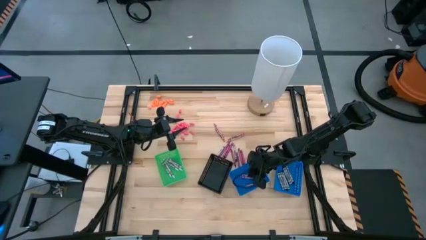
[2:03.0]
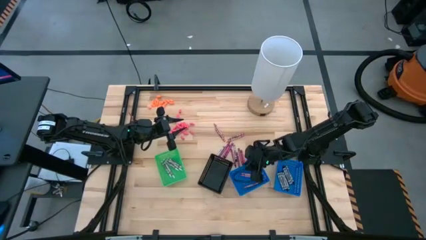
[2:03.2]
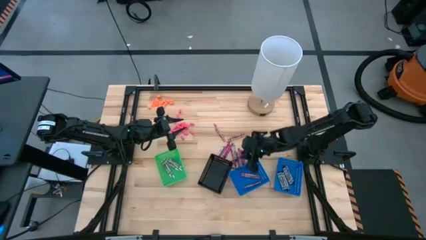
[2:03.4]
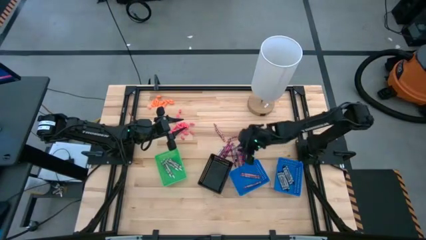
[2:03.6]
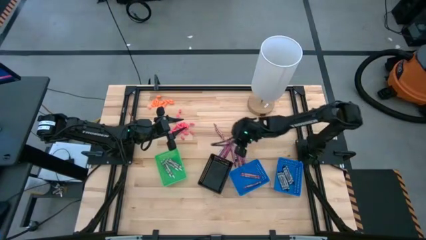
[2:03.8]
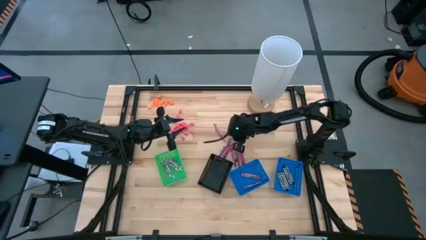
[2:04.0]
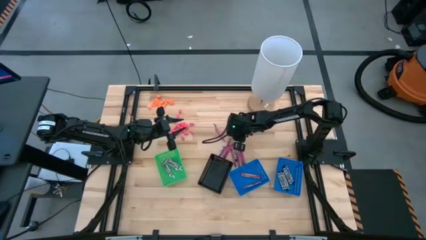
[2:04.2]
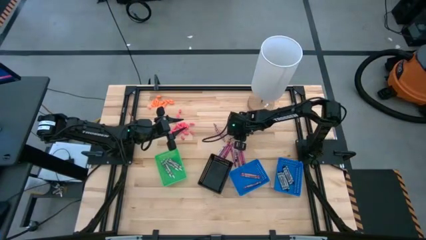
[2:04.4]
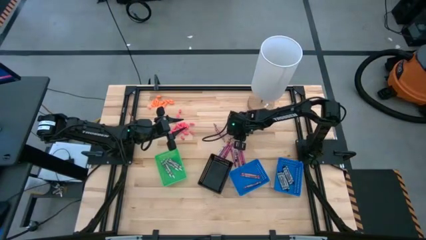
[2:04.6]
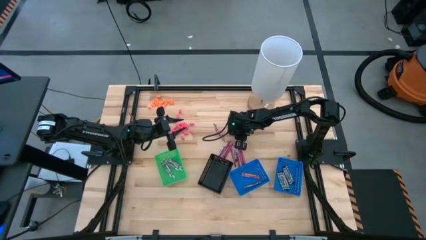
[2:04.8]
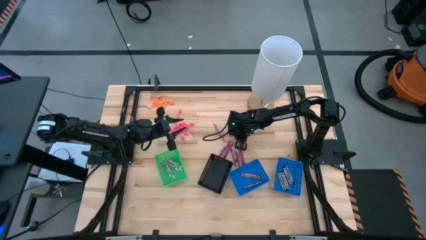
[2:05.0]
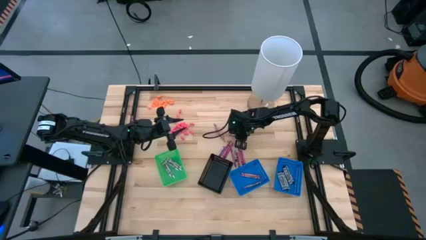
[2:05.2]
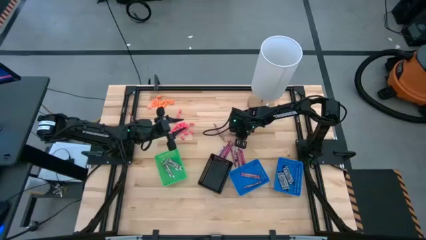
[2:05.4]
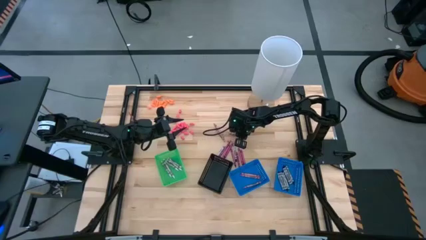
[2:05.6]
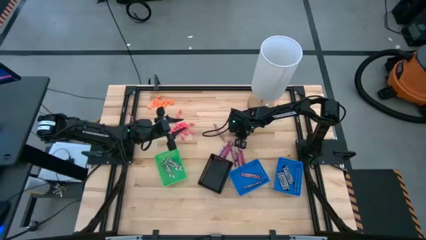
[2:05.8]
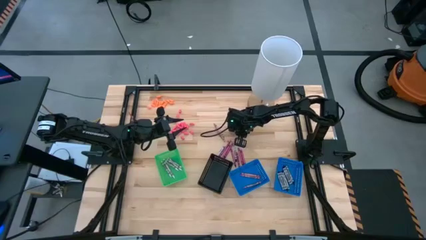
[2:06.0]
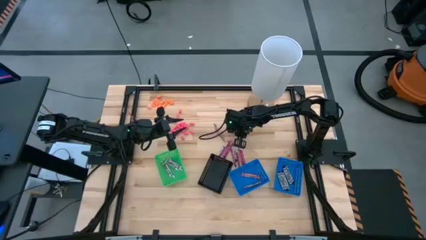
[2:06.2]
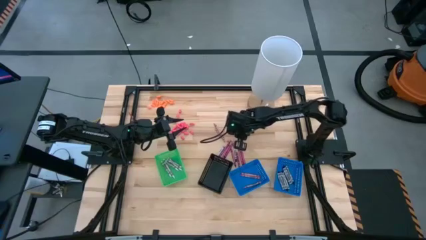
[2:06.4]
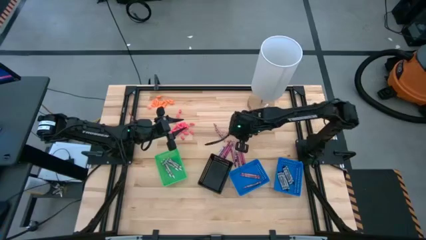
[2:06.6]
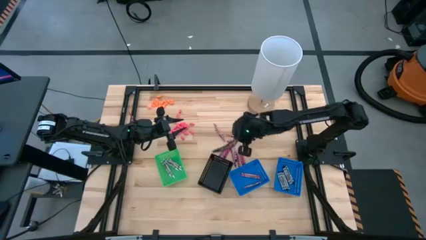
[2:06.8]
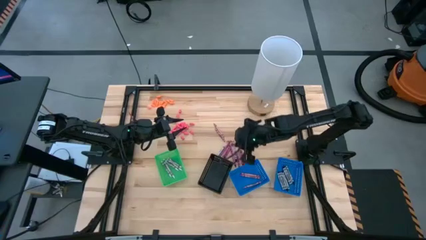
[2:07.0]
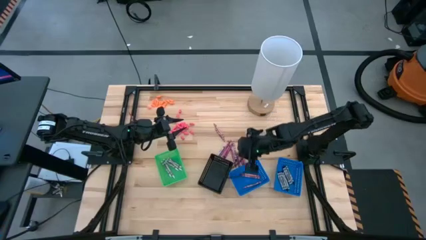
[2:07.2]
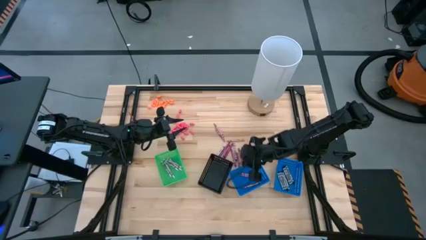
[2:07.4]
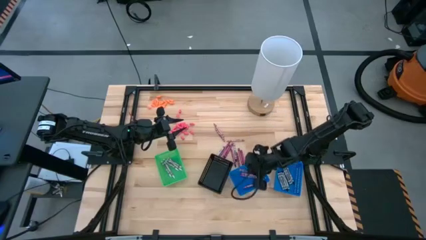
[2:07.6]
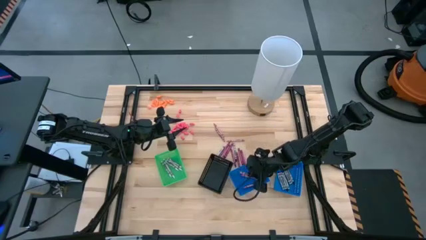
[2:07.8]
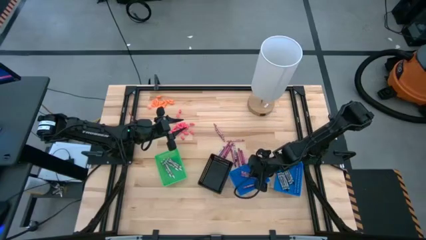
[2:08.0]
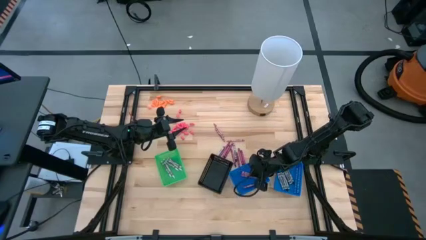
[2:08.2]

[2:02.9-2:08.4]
Task: Sort crayons
Put the pink crayon into the left blue bin

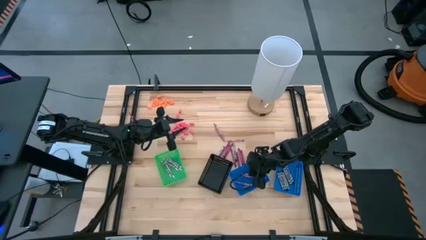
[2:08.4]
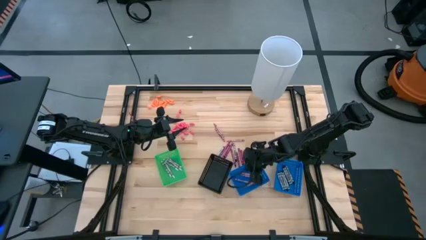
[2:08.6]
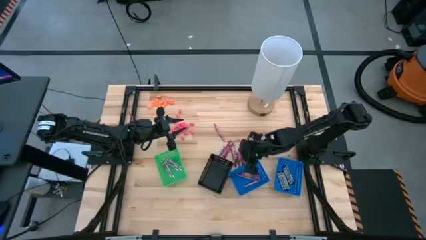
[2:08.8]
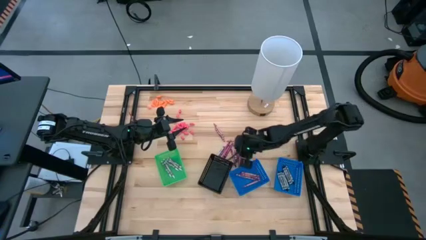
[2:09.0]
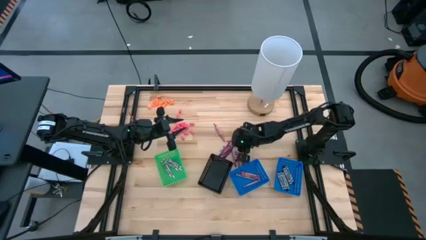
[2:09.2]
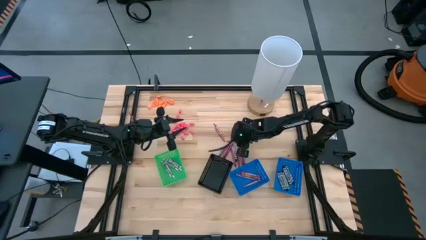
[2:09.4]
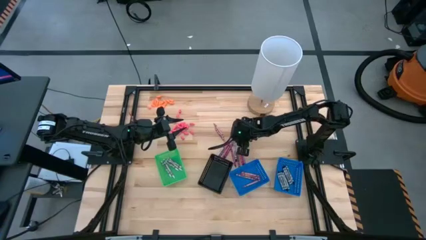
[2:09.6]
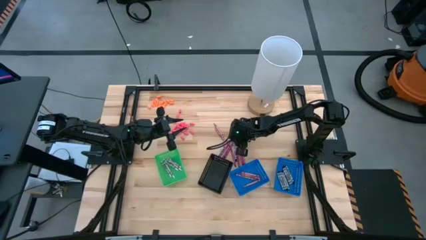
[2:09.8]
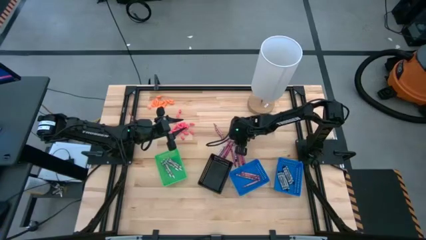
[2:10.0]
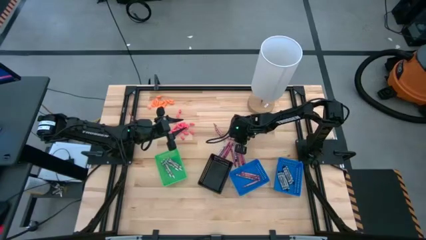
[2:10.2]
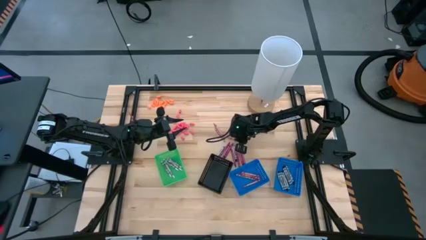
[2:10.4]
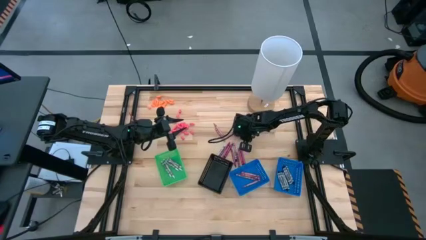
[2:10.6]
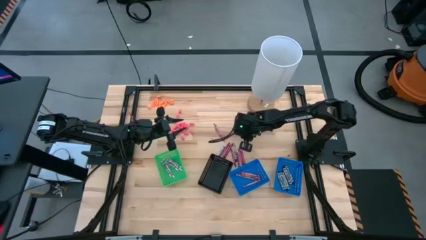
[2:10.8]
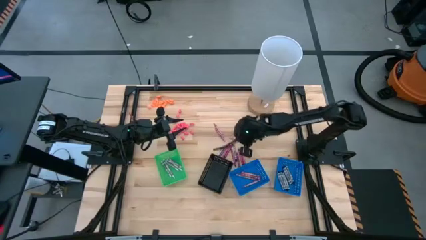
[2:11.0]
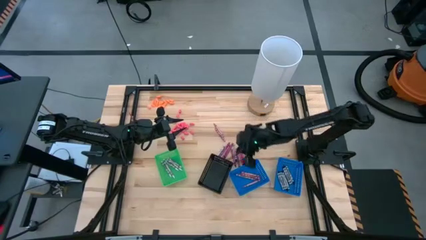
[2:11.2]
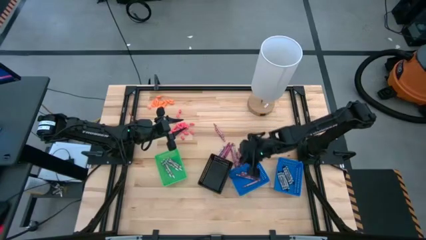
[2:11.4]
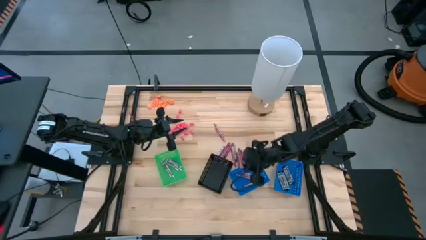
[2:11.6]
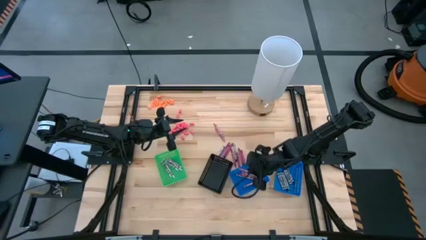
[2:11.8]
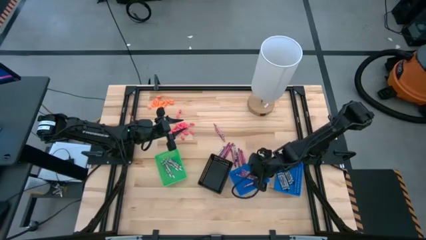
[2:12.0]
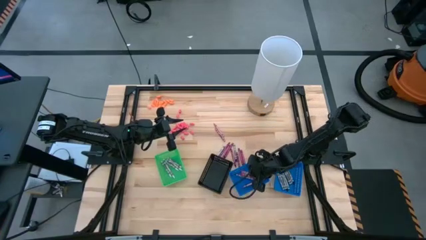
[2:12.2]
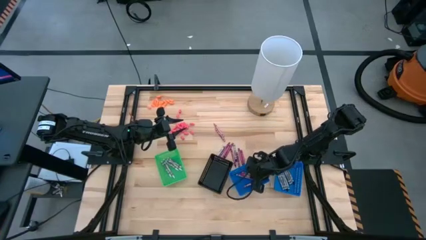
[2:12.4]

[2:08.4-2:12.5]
Put the pink crayon into the left blue bin

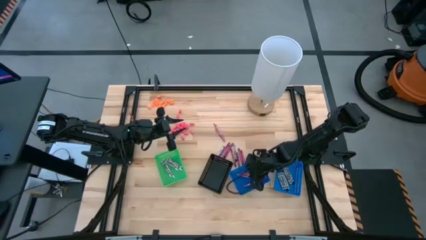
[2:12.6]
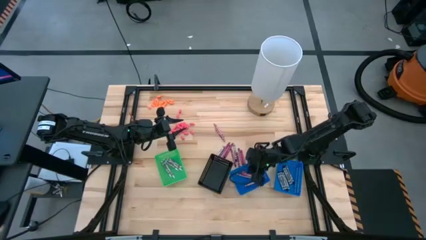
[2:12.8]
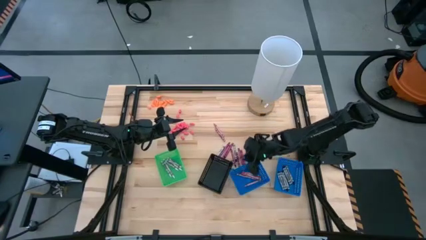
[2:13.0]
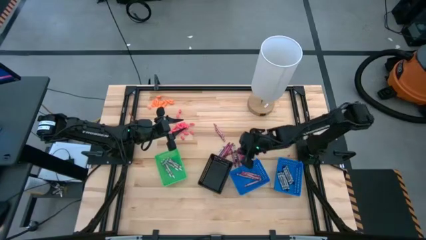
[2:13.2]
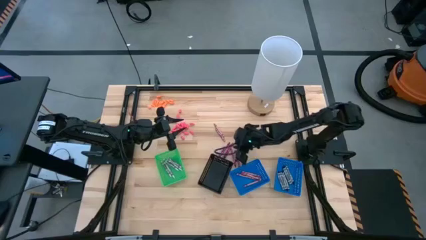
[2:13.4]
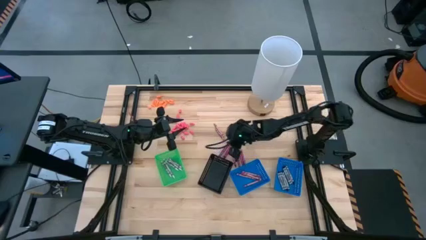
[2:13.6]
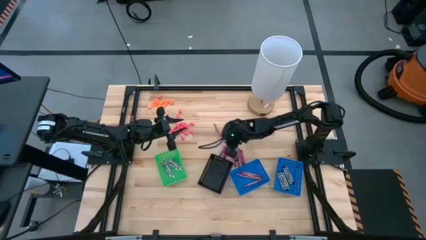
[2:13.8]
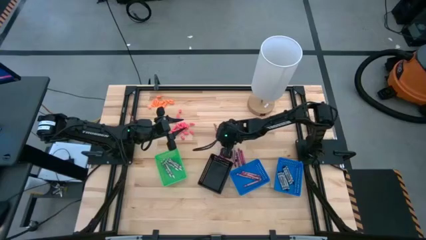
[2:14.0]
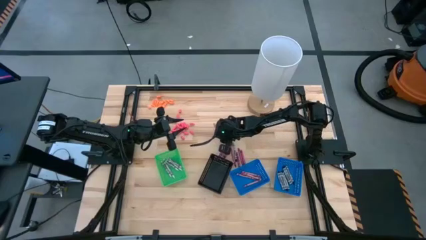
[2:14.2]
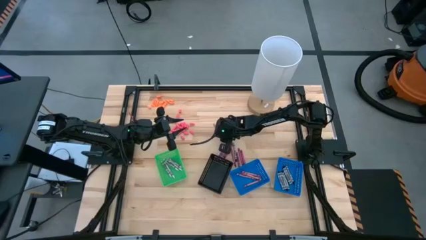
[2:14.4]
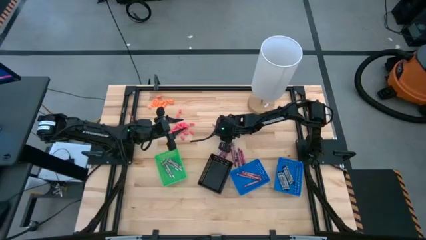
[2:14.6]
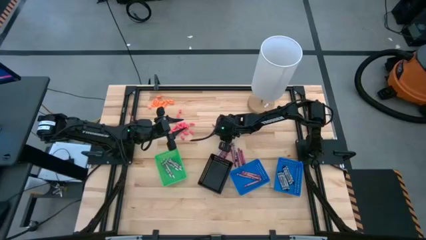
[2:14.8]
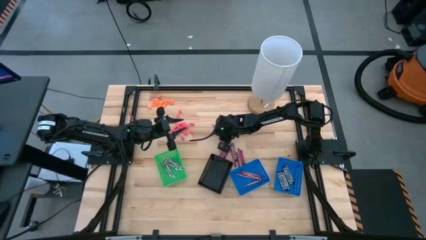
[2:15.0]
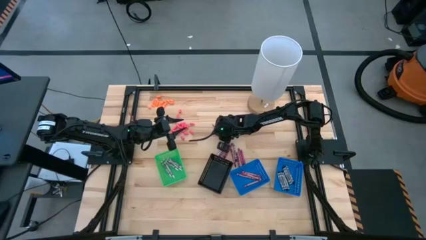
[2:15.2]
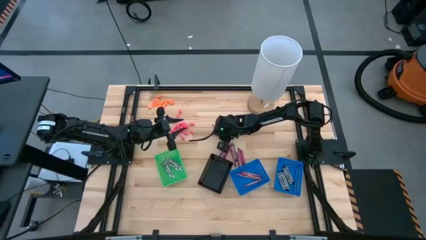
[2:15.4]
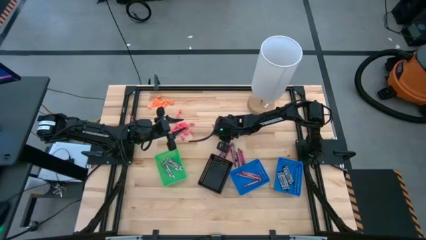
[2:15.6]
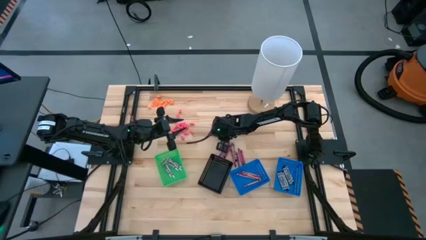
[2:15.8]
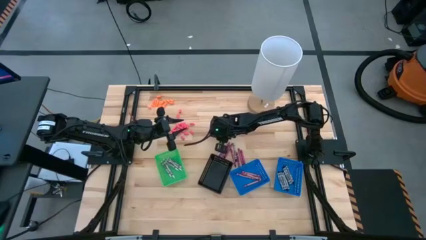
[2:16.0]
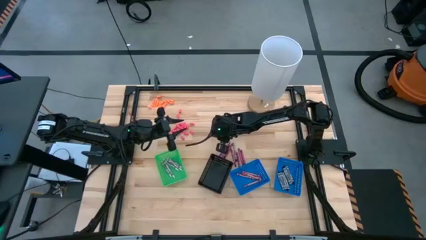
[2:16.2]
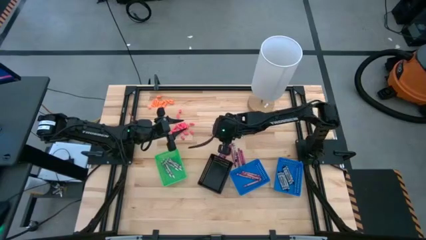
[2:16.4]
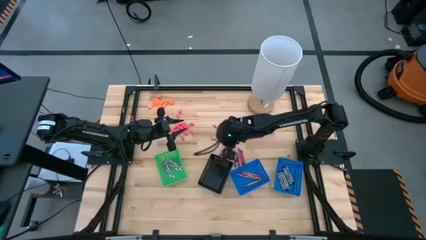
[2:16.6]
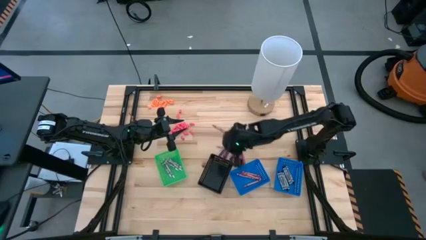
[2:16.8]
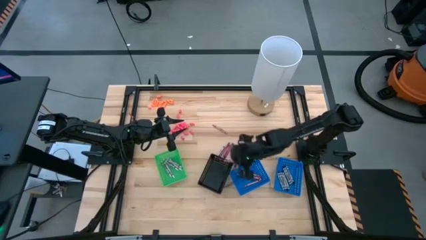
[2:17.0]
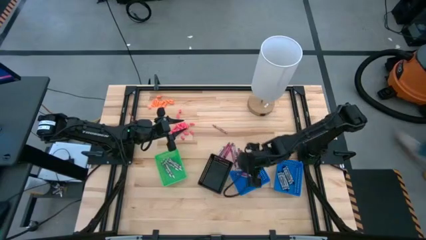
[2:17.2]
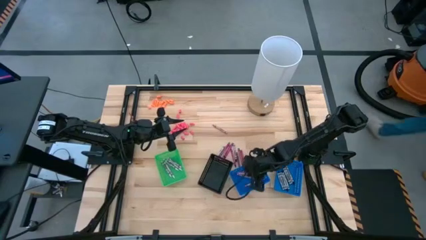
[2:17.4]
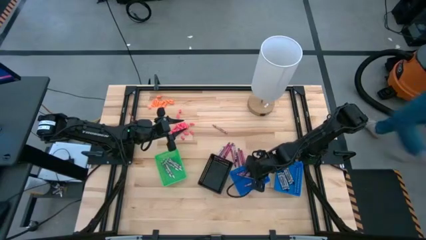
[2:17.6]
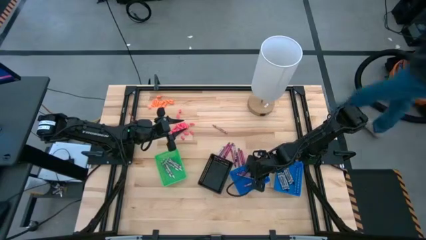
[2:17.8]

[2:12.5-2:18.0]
Put the pink crayon into the left blue bin
